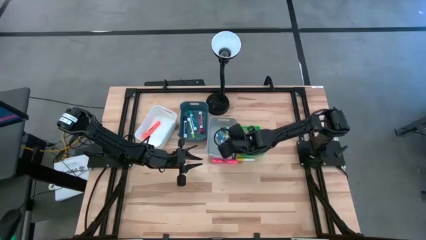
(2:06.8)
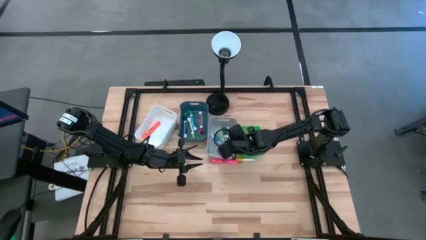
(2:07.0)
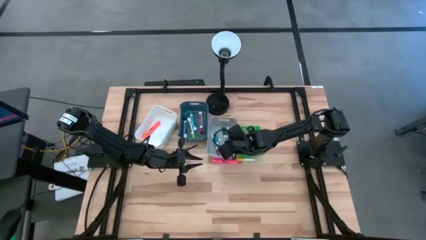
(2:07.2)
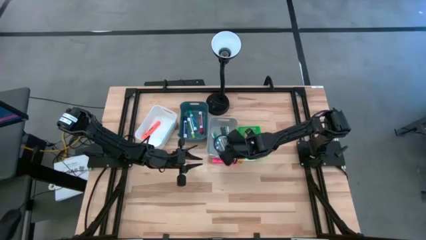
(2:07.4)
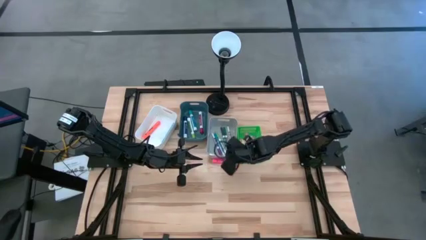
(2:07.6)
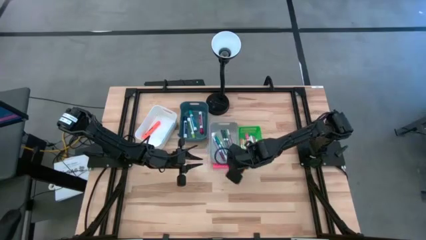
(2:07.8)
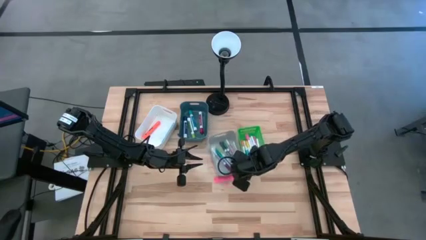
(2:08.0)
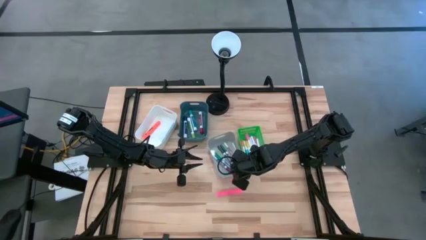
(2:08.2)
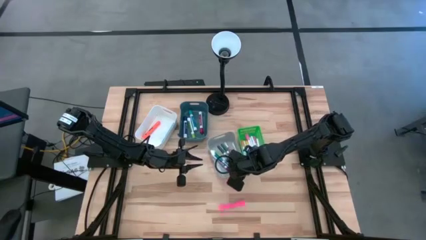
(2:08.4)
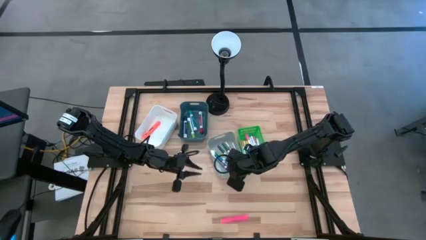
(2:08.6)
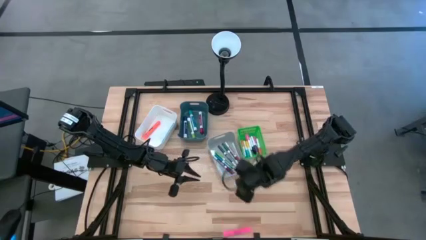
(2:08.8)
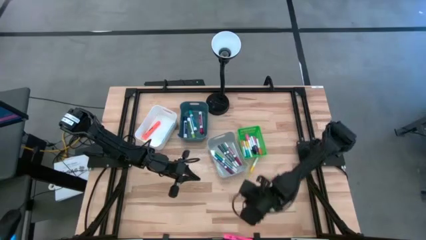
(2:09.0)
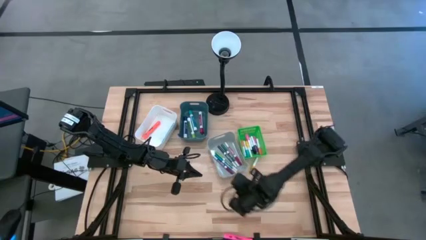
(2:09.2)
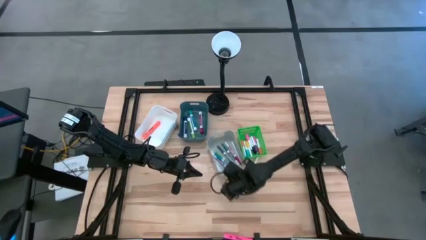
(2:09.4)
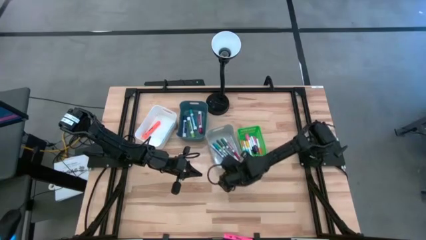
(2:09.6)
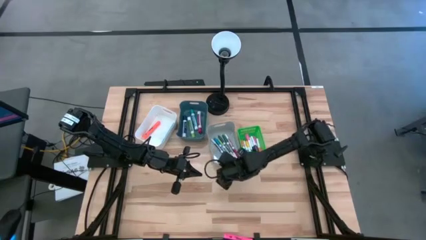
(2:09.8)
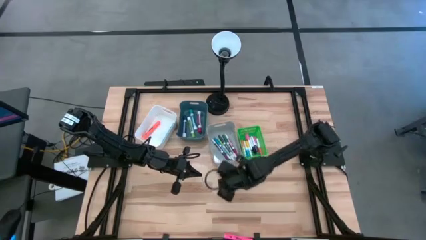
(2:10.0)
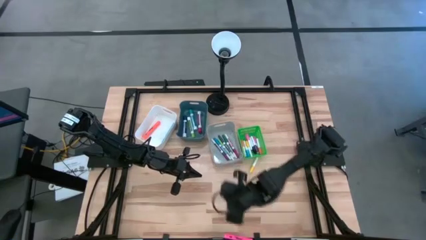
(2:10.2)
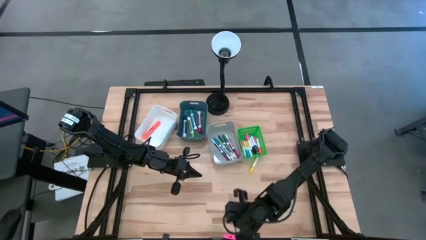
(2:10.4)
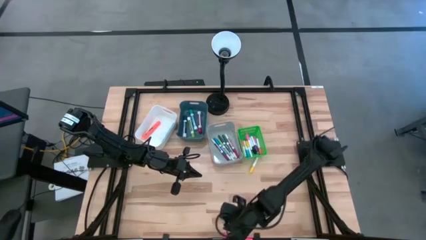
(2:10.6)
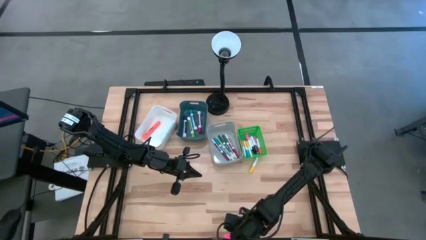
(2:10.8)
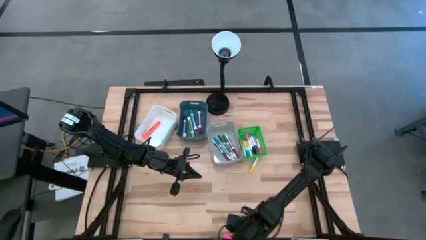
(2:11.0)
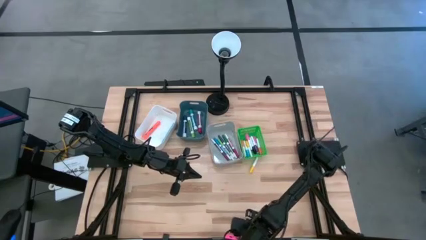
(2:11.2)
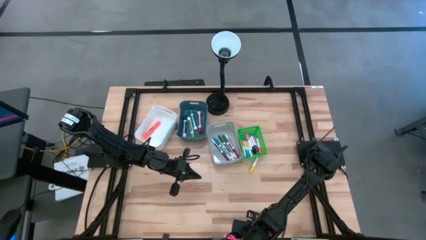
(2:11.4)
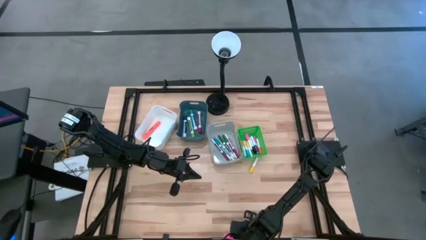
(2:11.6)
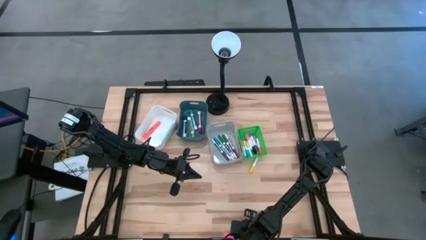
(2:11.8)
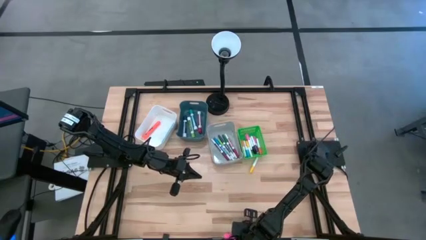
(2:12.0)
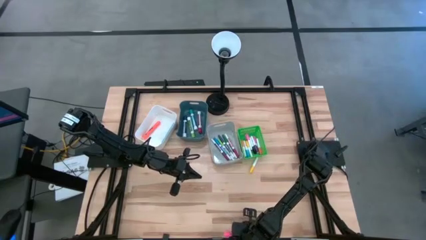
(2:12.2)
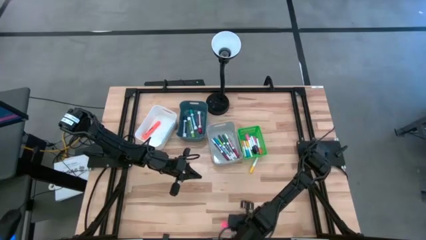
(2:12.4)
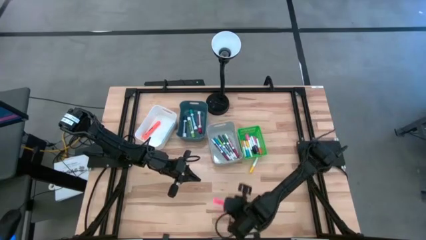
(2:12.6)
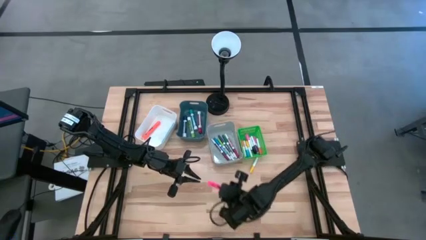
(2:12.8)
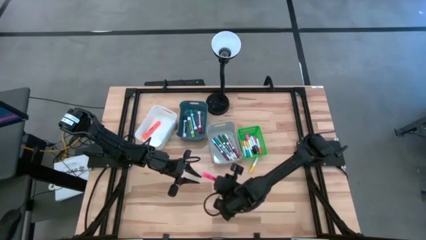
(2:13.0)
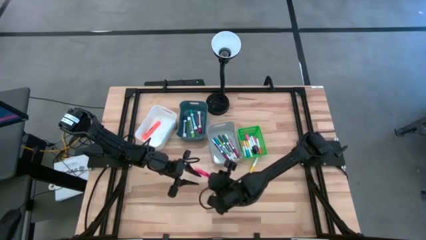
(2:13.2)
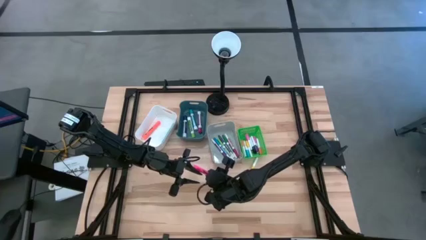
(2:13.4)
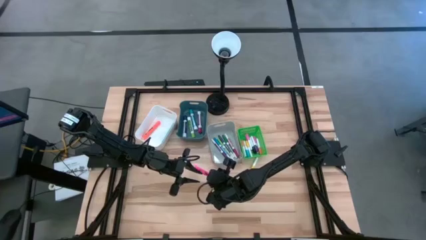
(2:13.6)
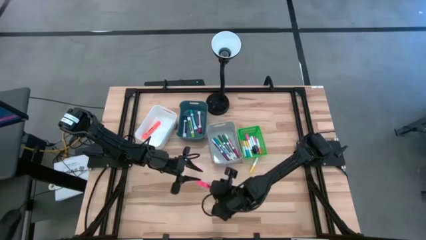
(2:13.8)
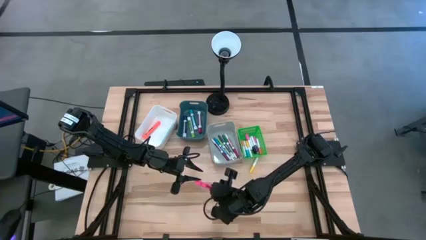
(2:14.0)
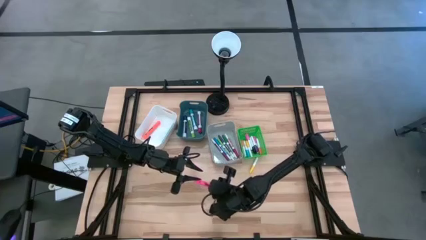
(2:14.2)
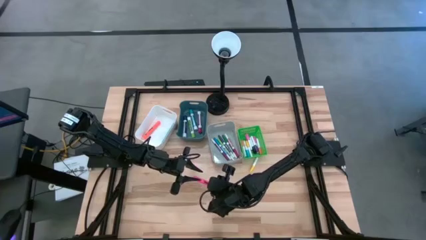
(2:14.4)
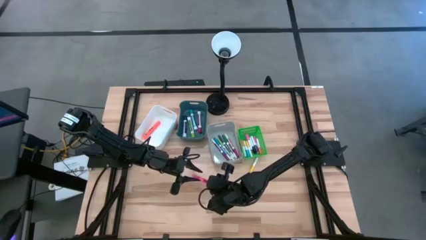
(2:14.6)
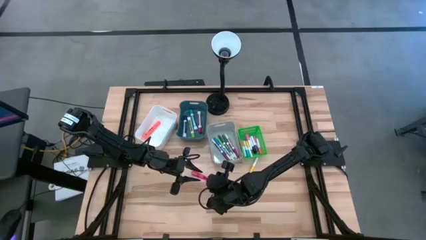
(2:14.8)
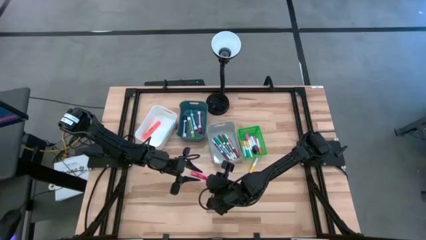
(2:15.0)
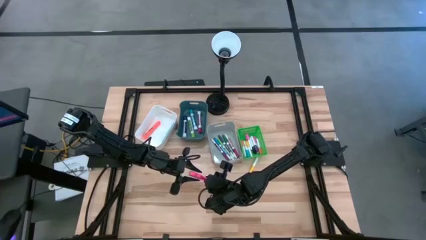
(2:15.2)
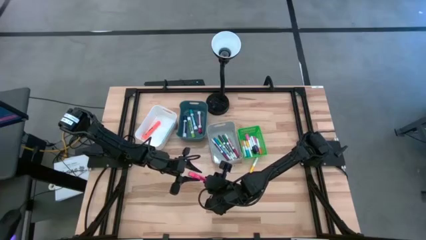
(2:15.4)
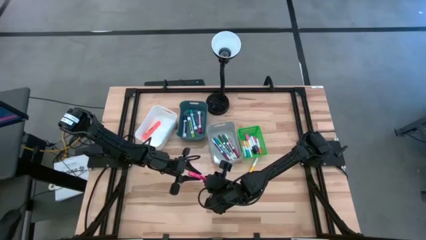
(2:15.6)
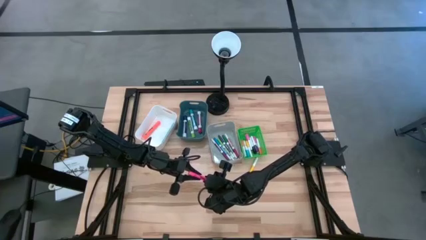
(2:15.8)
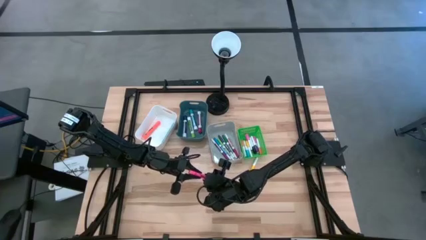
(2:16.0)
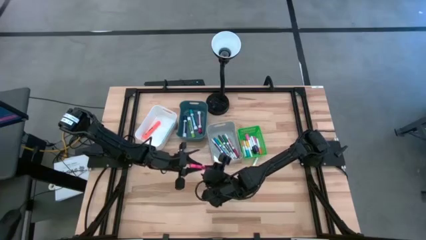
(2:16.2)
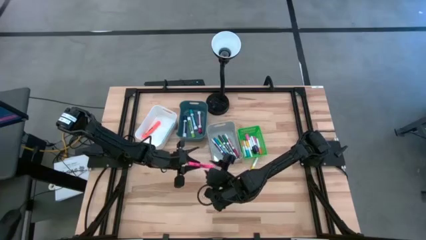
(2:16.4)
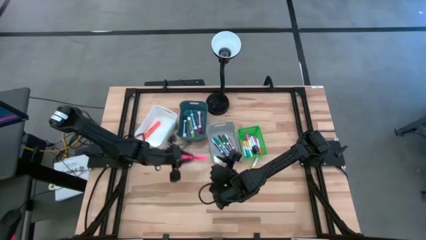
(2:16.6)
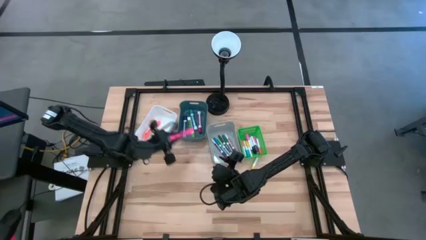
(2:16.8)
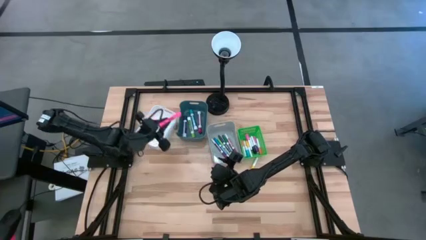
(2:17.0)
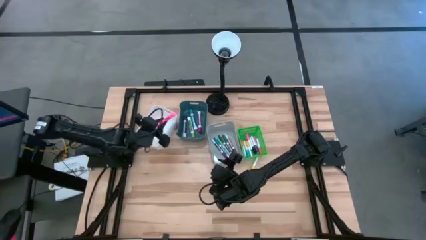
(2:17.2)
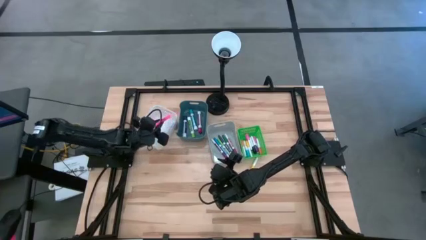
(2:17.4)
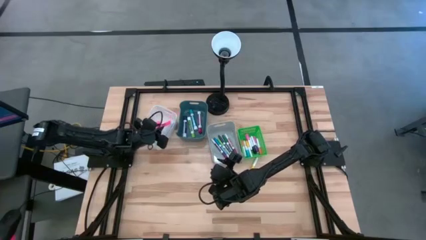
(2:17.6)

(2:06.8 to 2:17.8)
Task: Pick & Place Markers
Put the large pink highlighter pen into the white bin

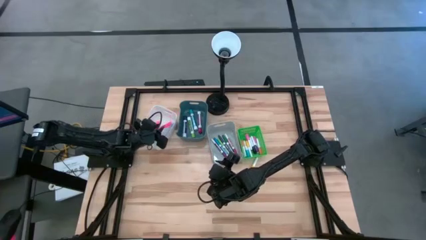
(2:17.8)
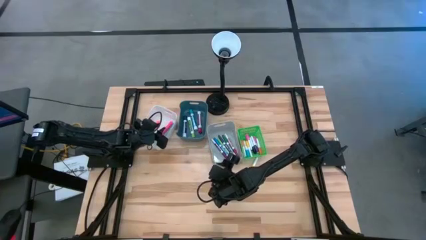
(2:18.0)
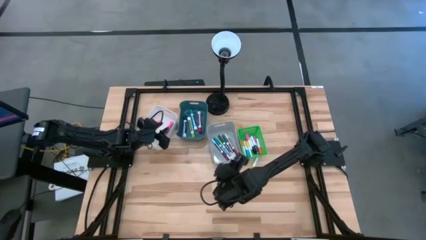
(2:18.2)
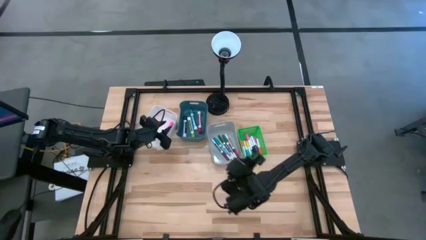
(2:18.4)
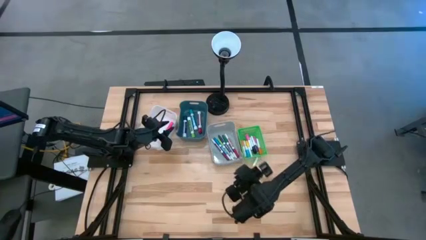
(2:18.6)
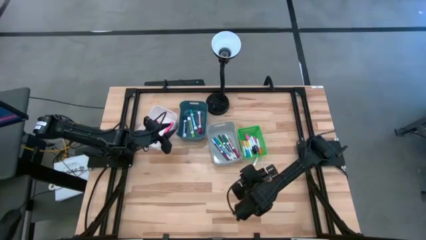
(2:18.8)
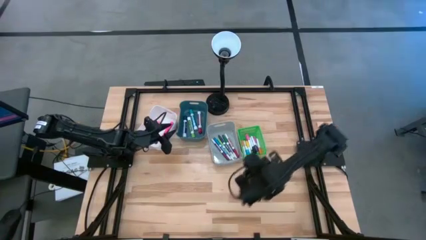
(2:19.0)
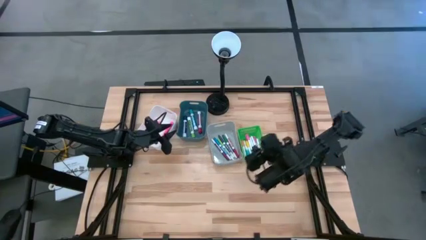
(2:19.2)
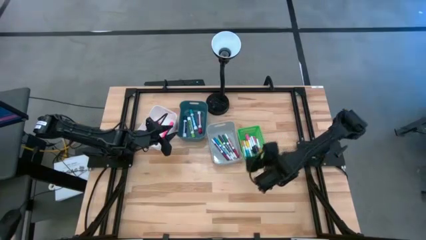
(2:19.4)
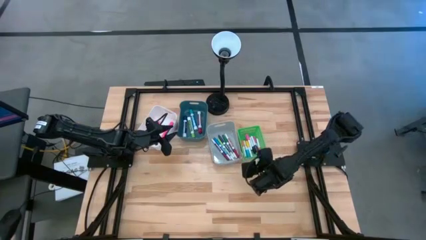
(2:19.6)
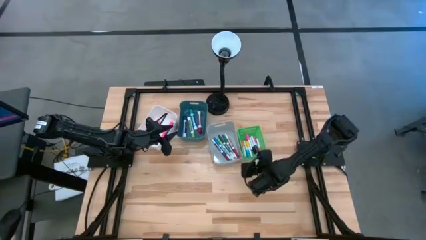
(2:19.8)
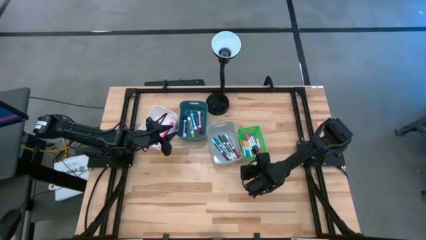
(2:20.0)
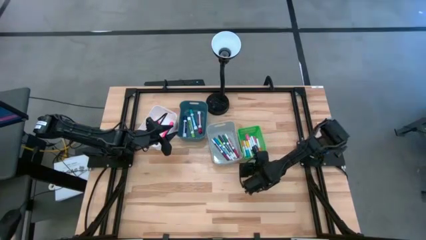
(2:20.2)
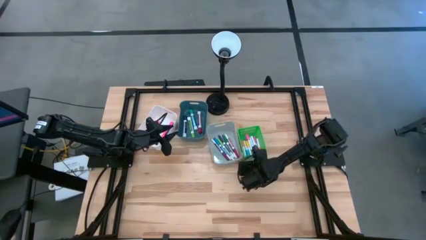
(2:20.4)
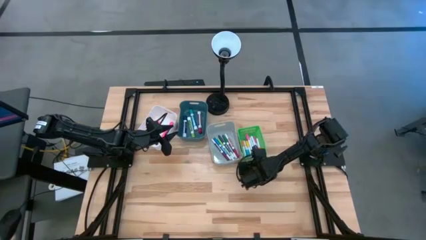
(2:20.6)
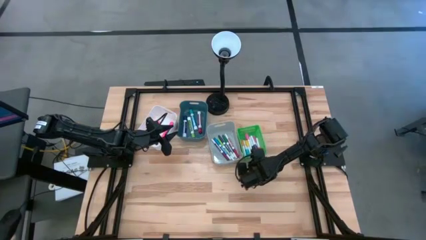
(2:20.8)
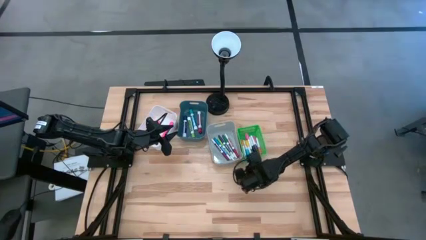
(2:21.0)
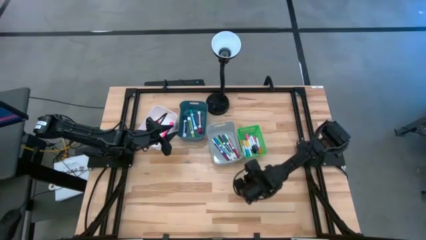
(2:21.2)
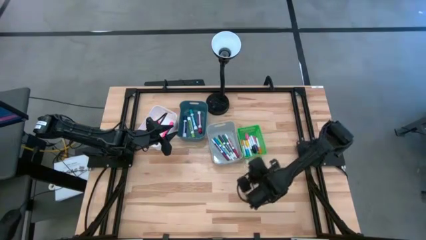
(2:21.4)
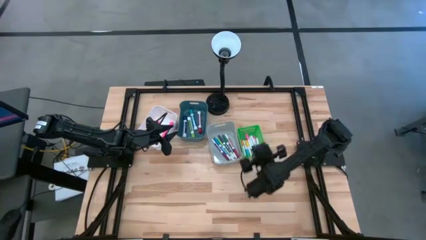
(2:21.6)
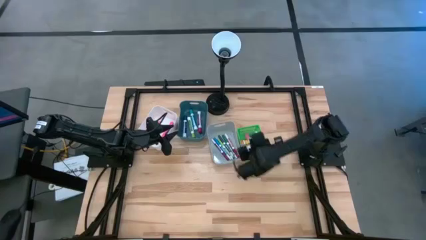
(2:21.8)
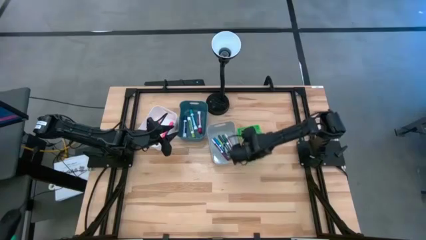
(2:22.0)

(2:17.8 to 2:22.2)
Put the small yellow highlighter pen into the green bin

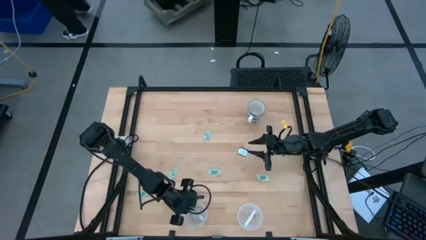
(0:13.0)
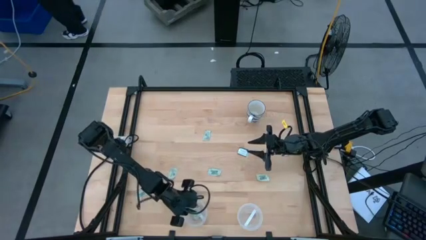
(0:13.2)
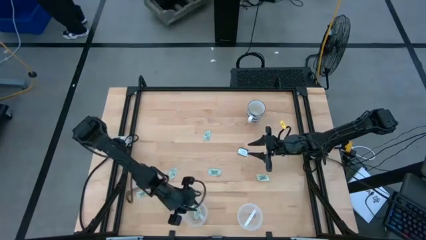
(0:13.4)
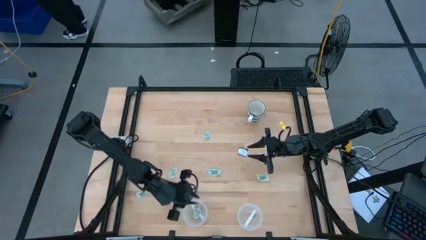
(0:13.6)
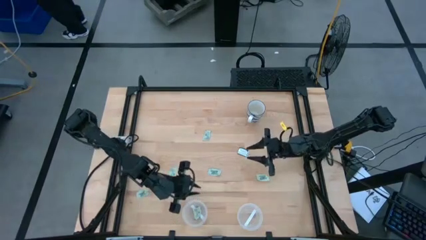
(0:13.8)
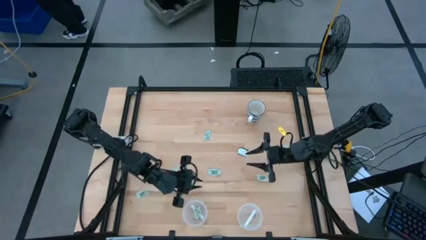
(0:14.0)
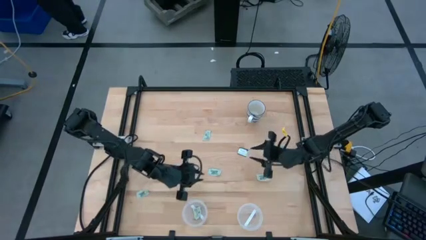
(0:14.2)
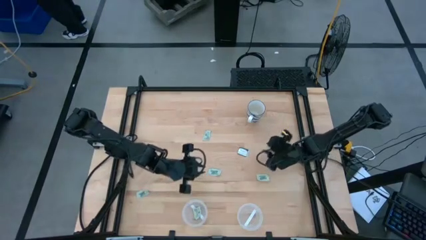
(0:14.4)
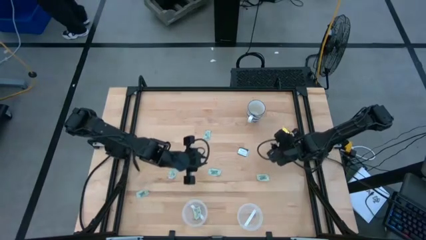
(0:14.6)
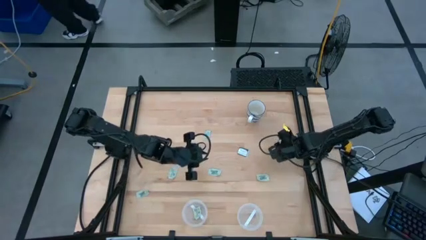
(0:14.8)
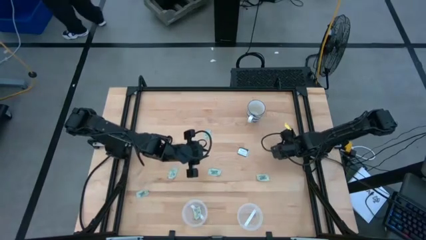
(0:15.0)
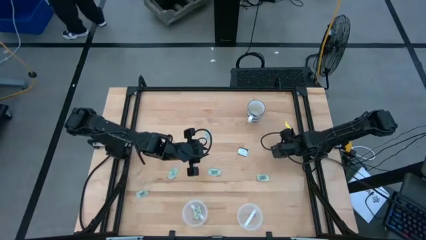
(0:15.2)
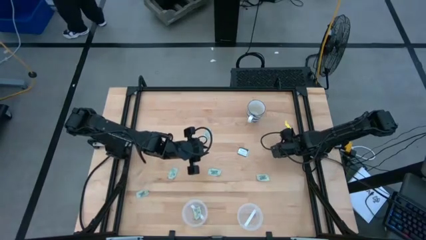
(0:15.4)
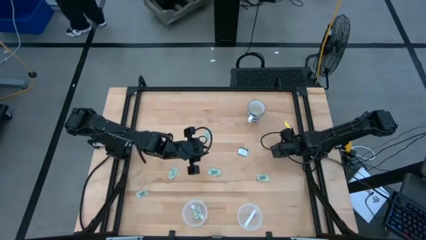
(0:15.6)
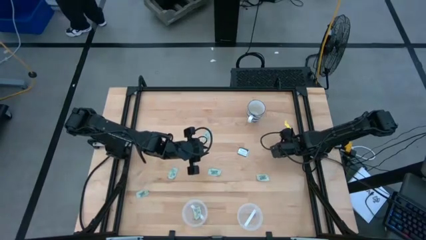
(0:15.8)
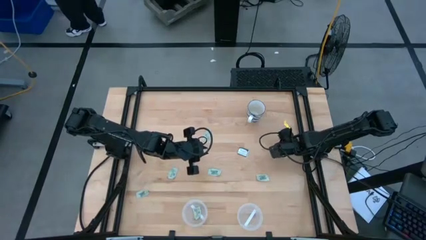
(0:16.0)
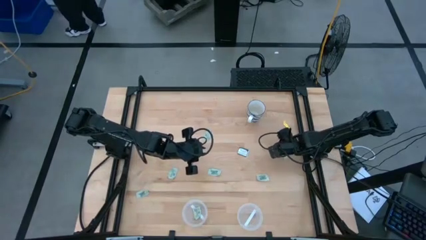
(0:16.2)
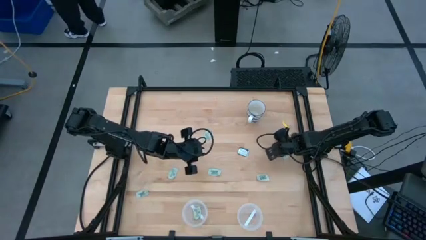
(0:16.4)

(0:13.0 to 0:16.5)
Task: Pick and place Stevia / Truvia into bins
Put the white stevia packet into the right transparent container
